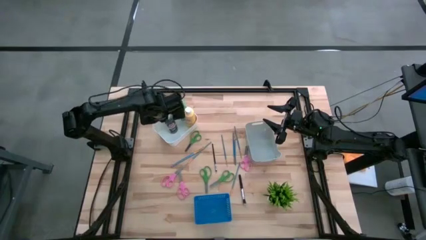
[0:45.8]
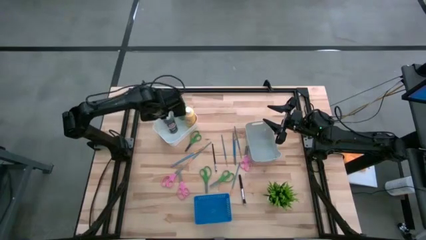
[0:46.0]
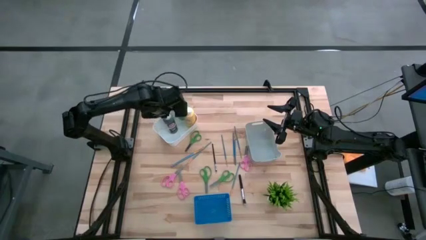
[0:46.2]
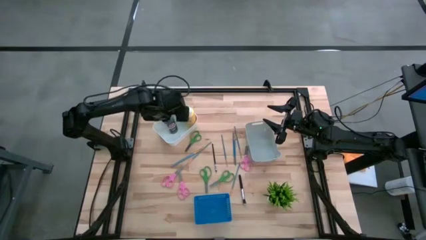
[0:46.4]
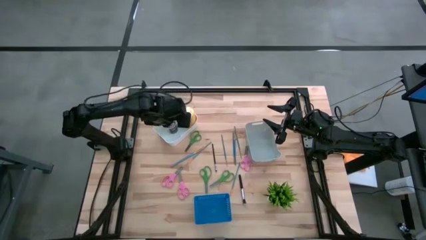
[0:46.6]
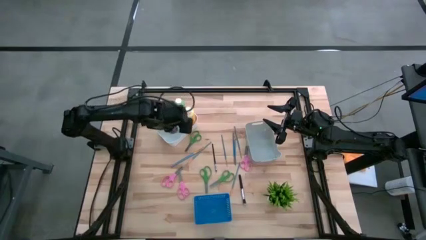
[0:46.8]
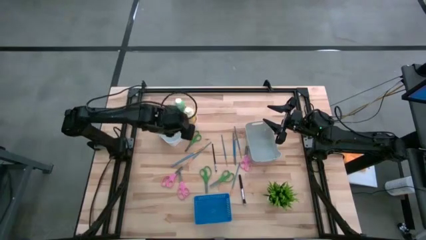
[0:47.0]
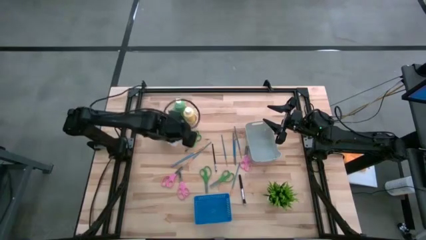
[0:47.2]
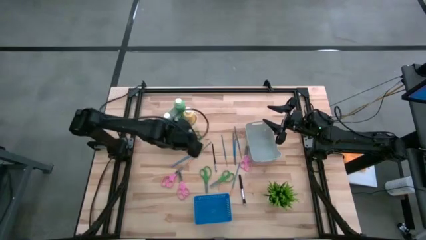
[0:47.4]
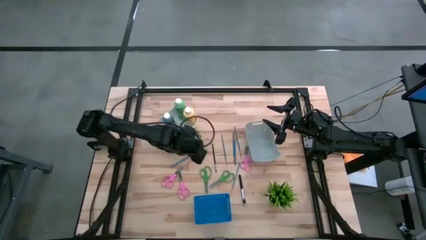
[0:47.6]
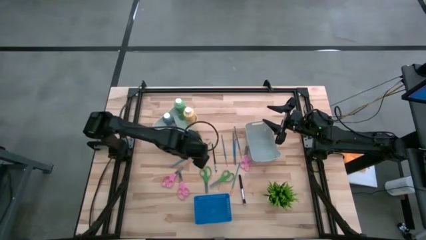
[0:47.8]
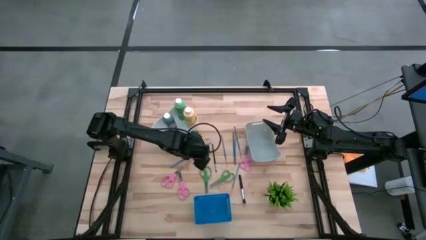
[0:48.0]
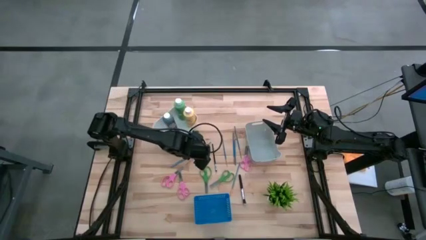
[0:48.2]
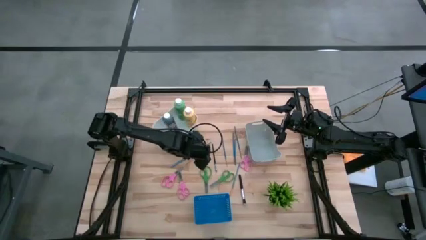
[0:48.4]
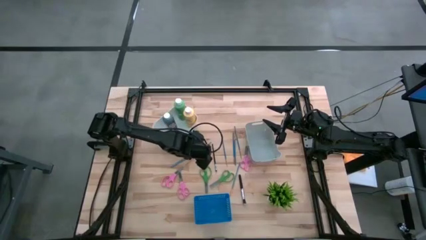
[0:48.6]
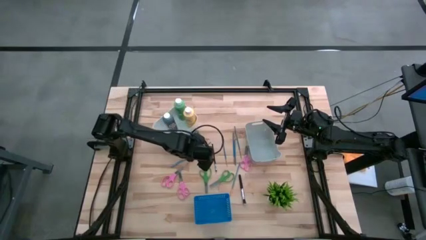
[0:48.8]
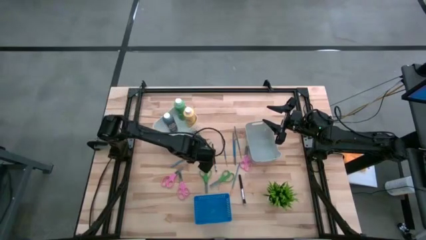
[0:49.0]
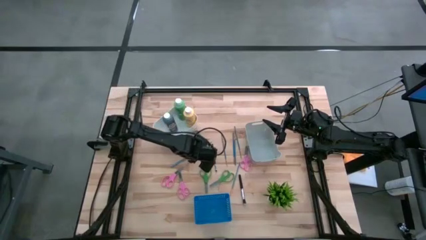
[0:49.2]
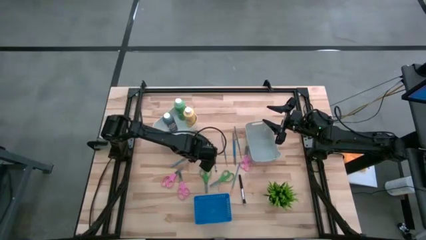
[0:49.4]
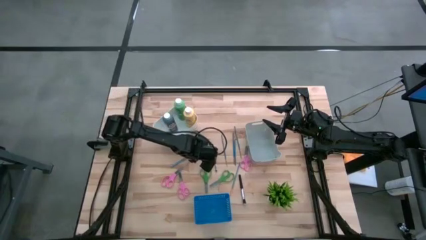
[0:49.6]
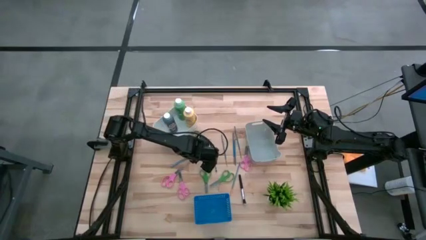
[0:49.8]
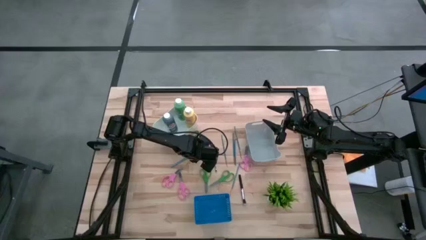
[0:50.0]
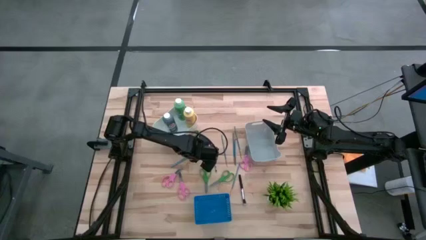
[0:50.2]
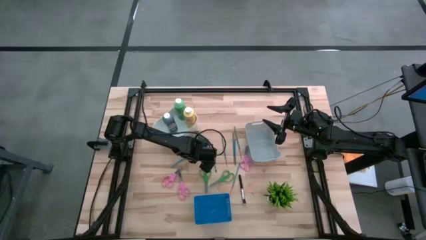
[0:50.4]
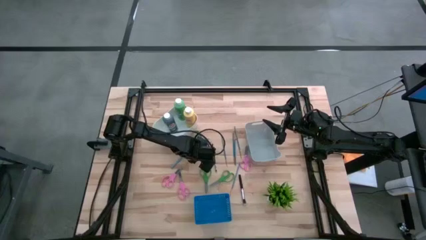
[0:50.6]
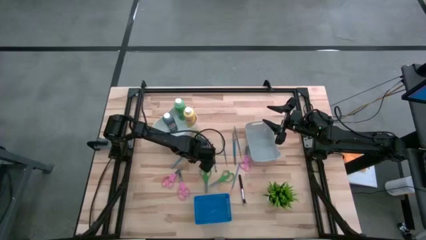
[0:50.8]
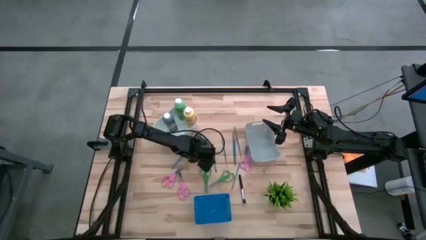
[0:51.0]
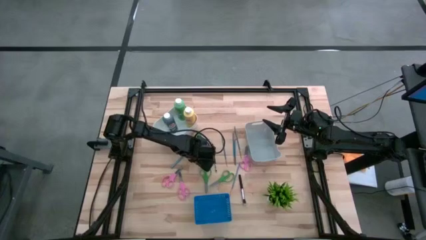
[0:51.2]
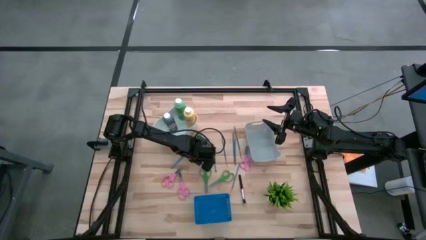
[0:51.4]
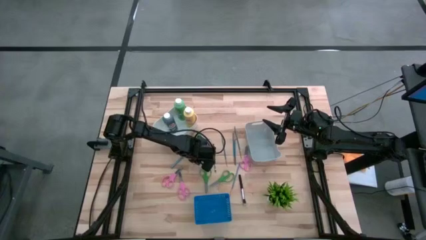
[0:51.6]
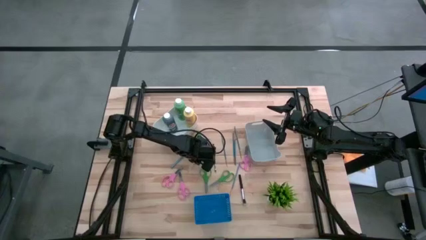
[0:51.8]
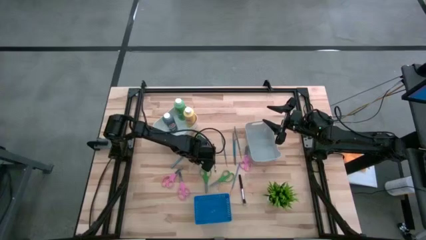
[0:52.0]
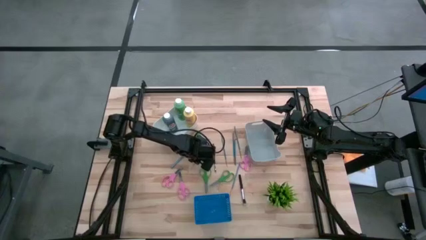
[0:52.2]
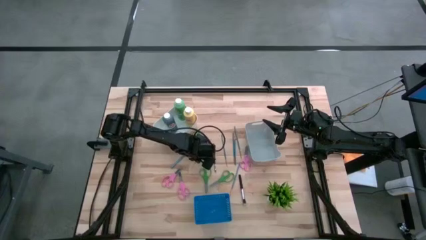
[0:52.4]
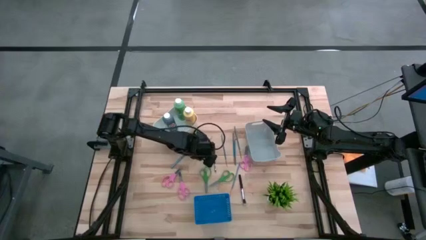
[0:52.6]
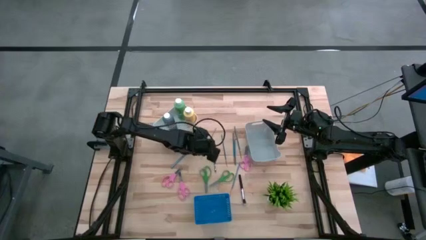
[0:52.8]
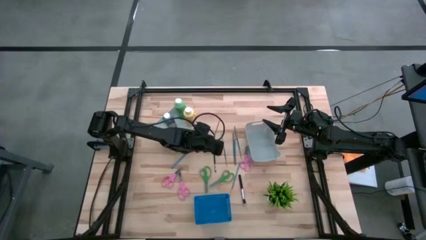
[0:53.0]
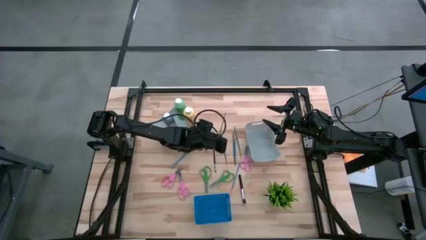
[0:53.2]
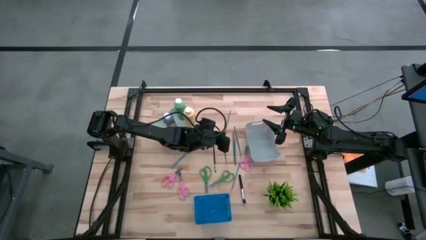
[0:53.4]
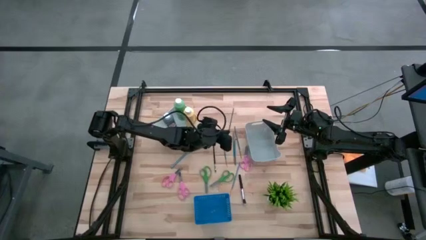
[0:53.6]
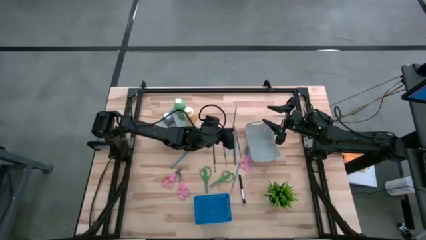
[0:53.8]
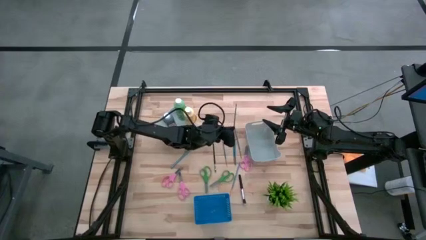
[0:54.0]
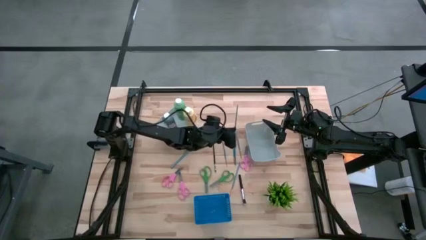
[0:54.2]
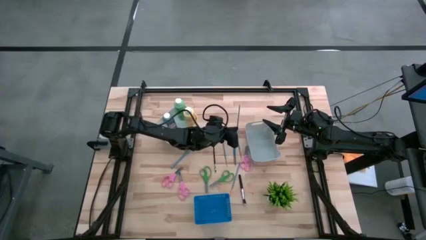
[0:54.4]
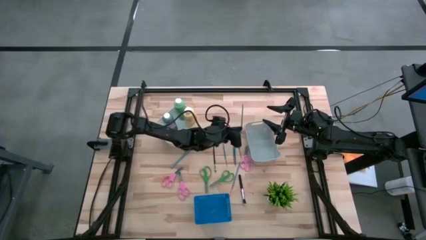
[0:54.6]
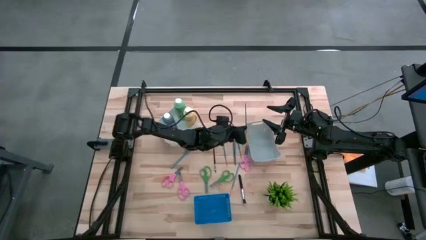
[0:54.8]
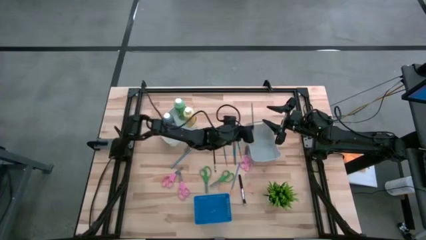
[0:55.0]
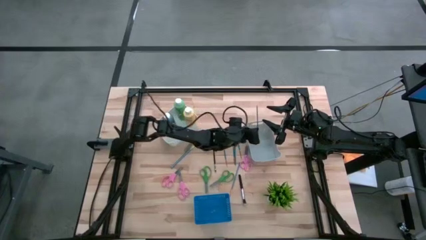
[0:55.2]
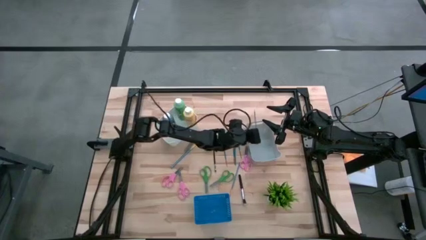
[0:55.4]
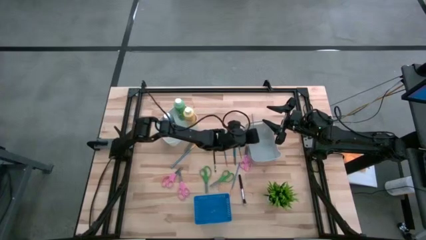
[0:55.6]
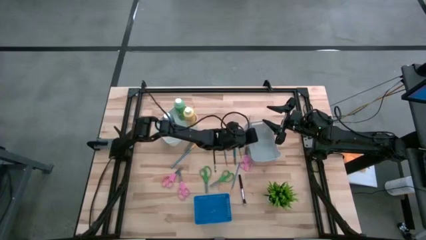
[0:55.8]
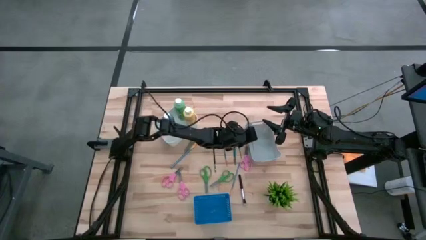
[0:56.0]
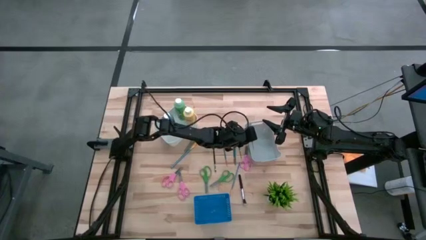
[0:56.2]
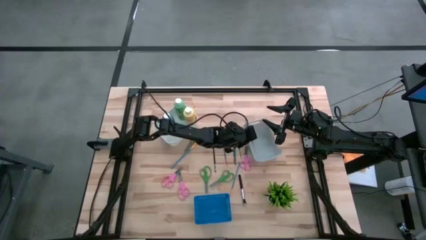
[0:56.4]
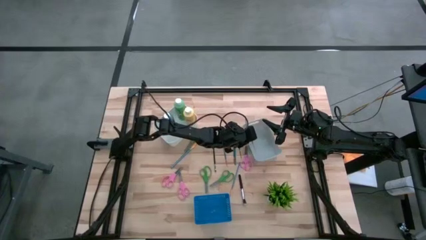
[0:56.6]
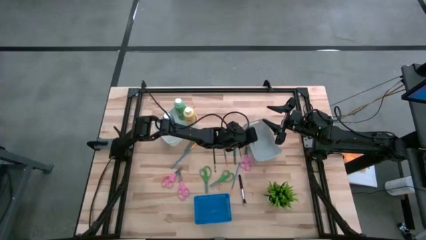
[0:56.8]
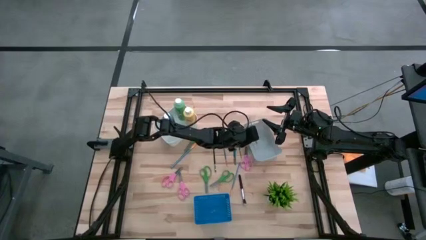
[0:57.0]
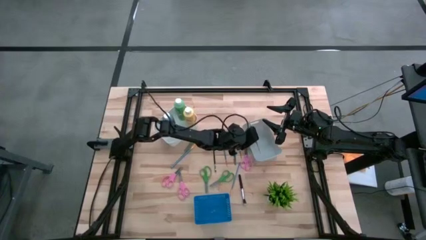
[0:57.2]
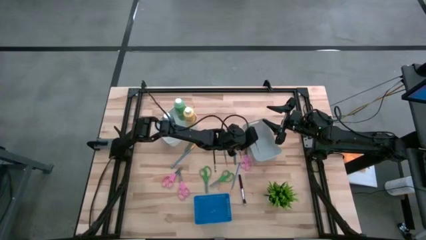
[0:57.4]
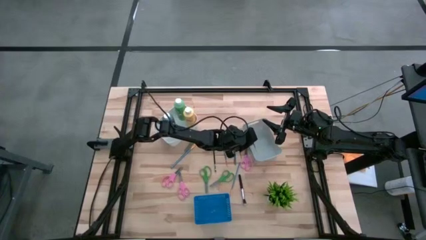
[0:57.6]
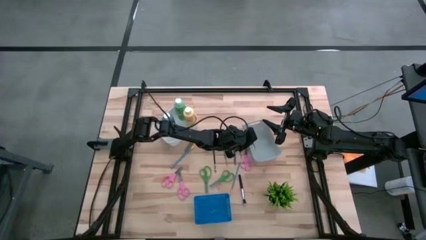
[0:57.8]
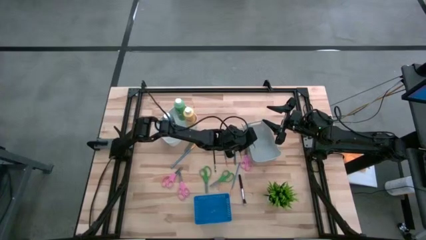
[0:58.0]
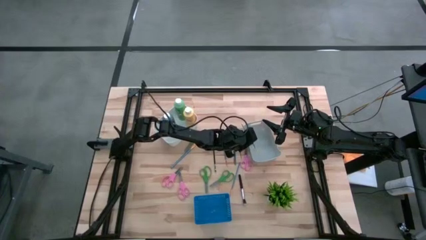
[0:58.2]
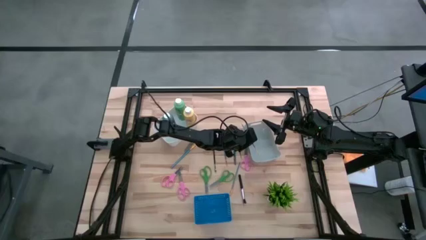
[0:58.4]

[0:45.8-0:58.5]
Task: Pick & Place Paint Supplies
Put the blue paintbrush into the gray bin
